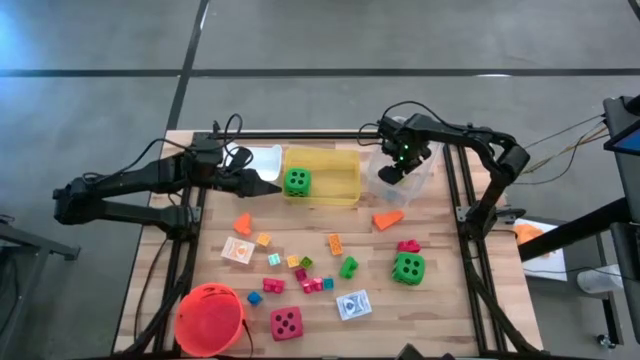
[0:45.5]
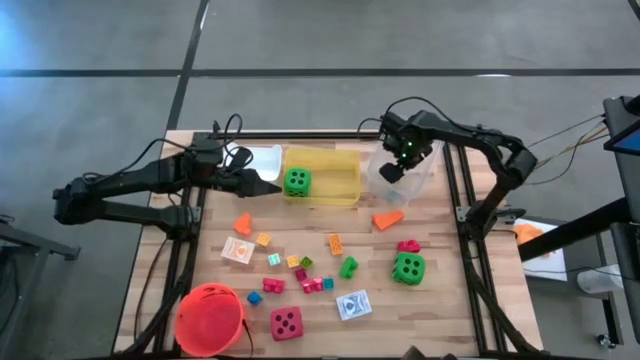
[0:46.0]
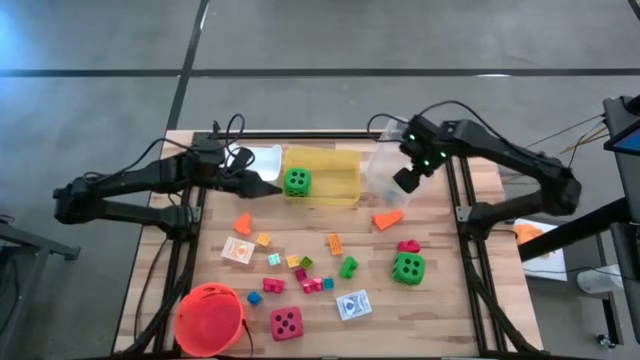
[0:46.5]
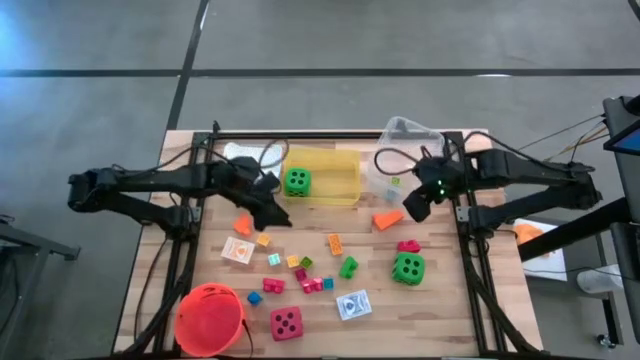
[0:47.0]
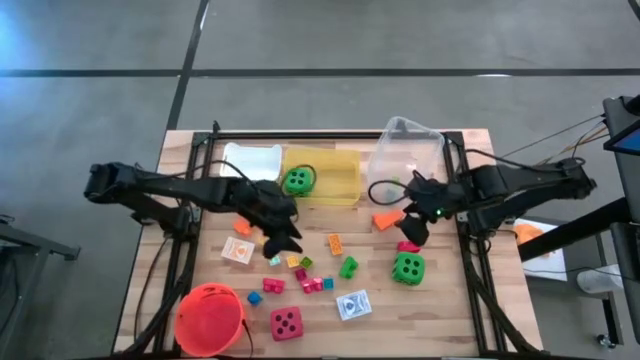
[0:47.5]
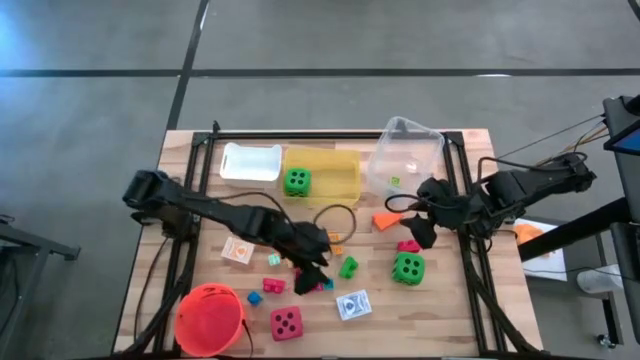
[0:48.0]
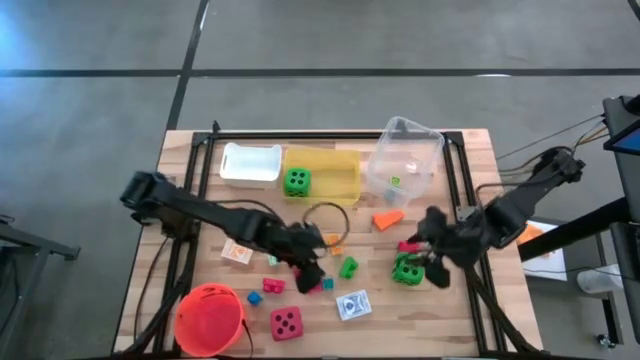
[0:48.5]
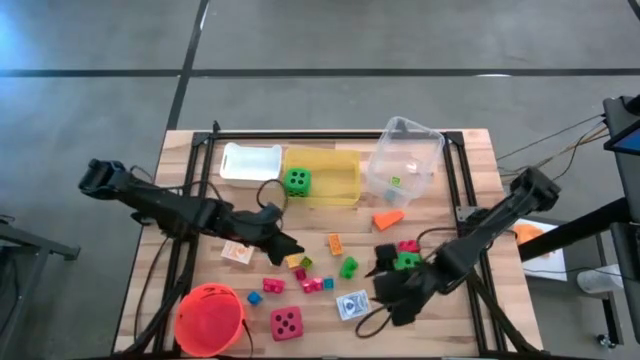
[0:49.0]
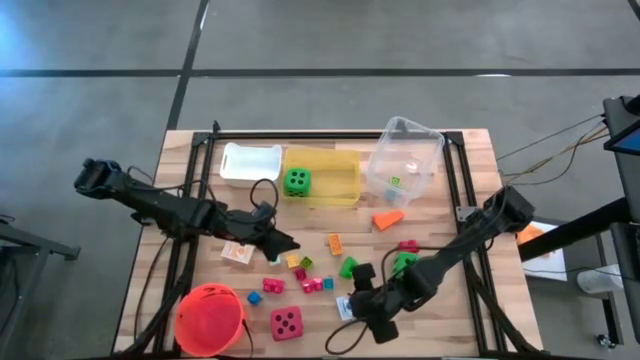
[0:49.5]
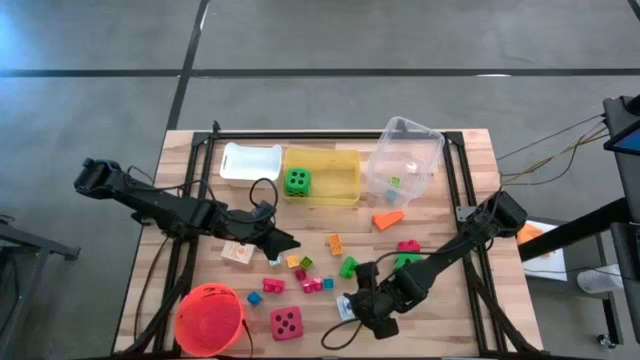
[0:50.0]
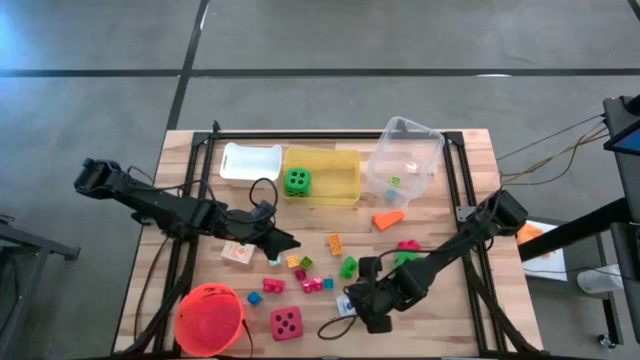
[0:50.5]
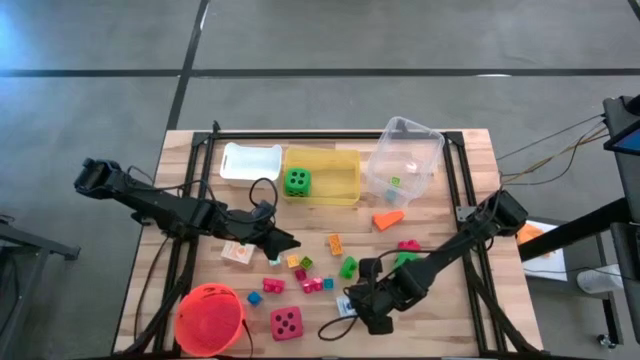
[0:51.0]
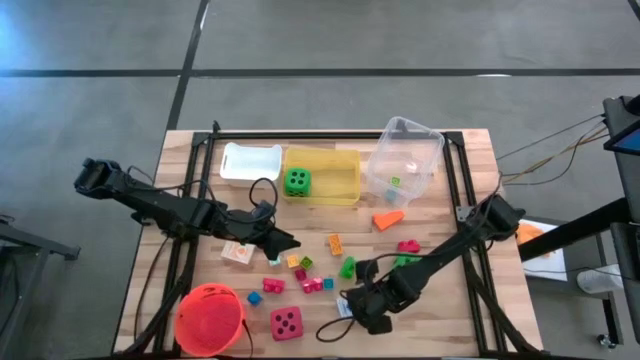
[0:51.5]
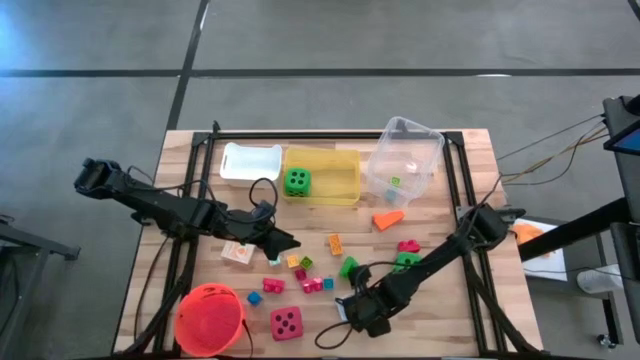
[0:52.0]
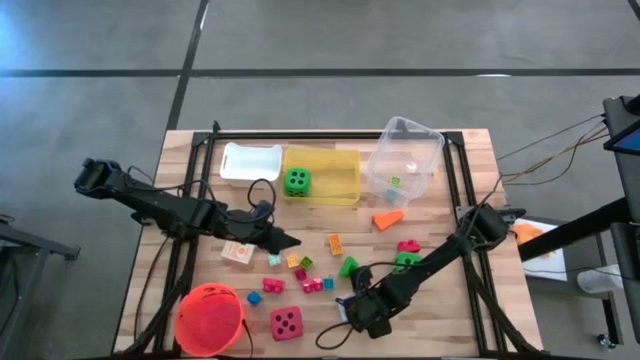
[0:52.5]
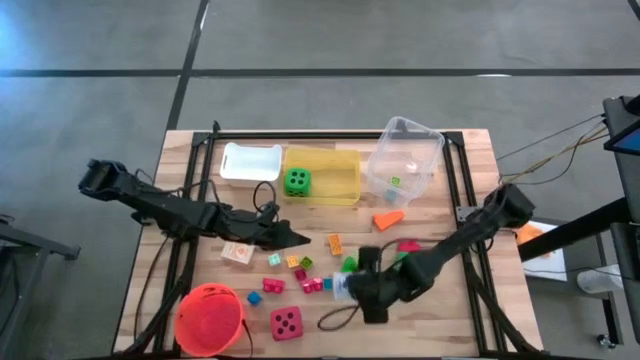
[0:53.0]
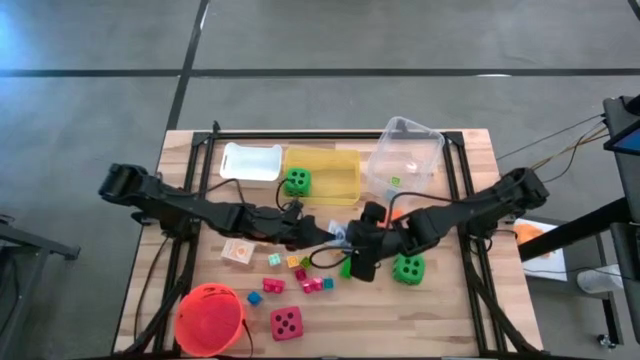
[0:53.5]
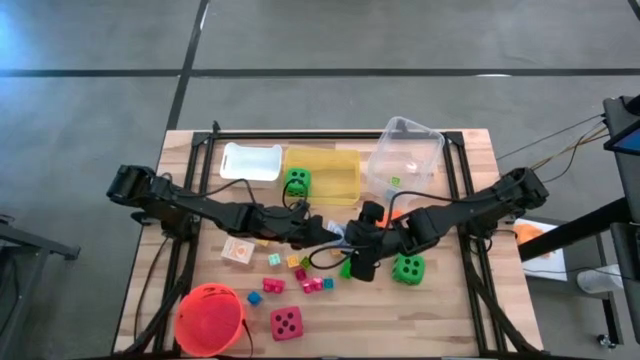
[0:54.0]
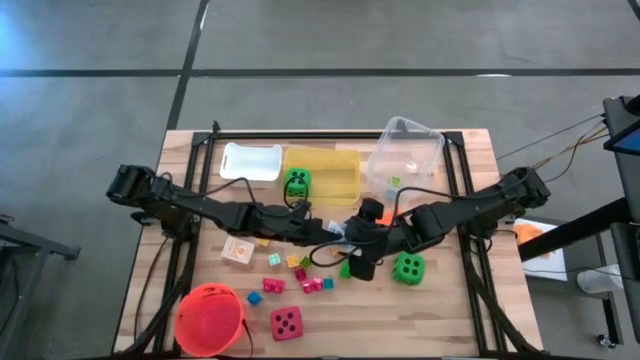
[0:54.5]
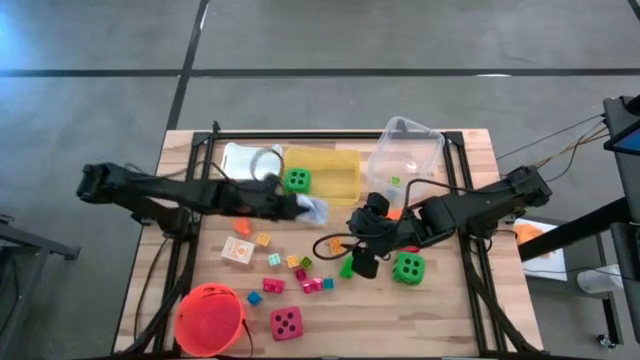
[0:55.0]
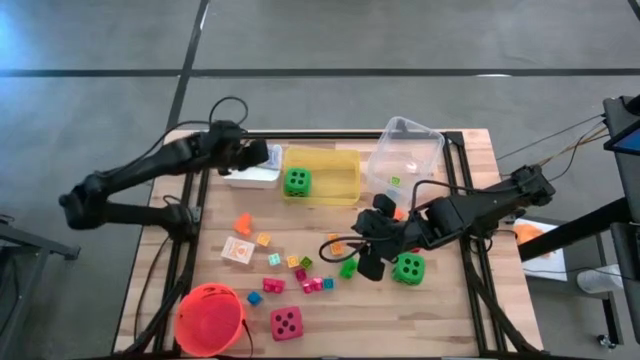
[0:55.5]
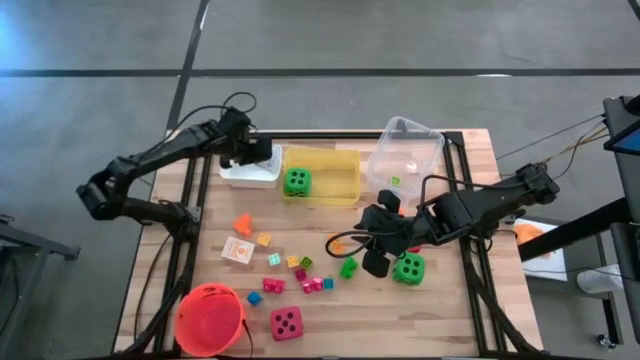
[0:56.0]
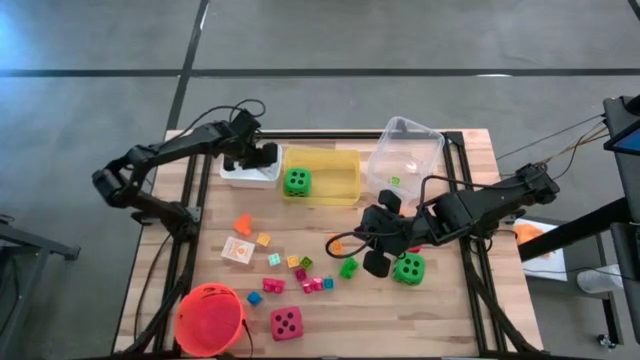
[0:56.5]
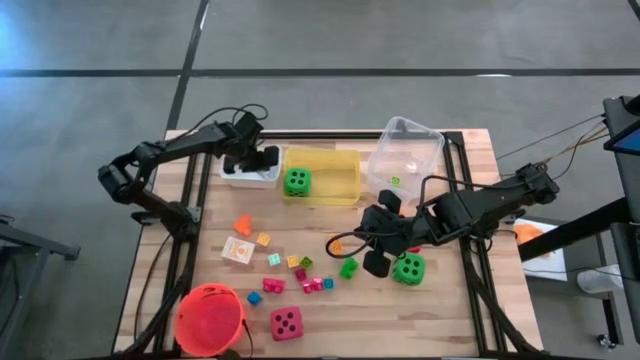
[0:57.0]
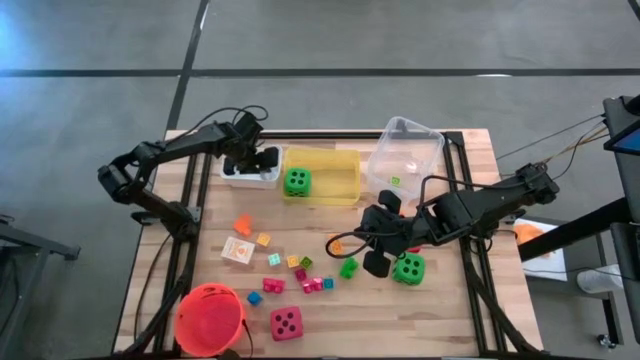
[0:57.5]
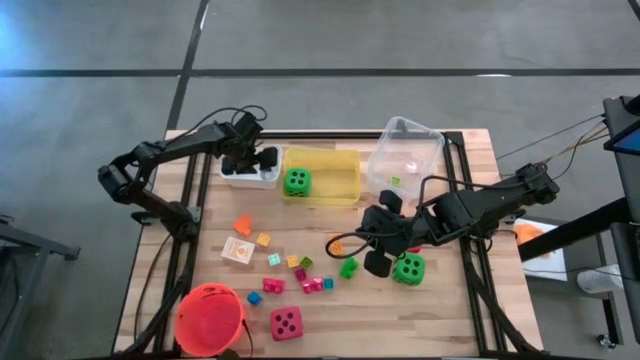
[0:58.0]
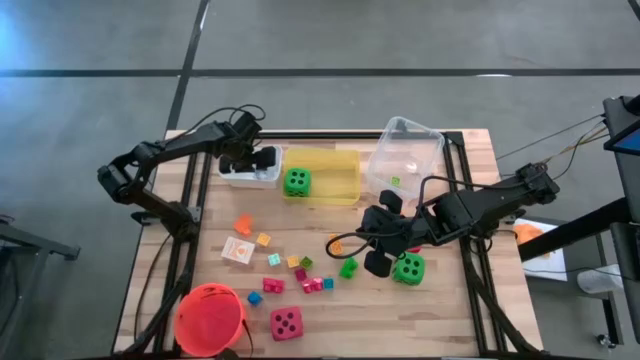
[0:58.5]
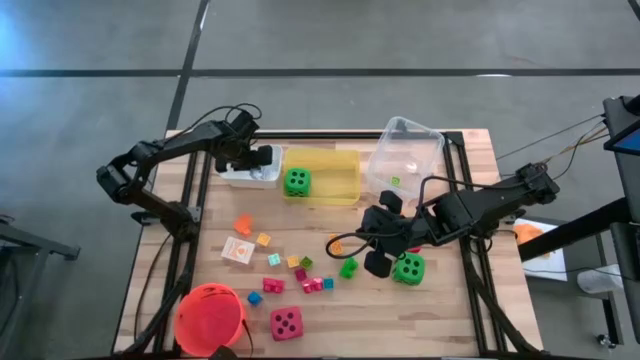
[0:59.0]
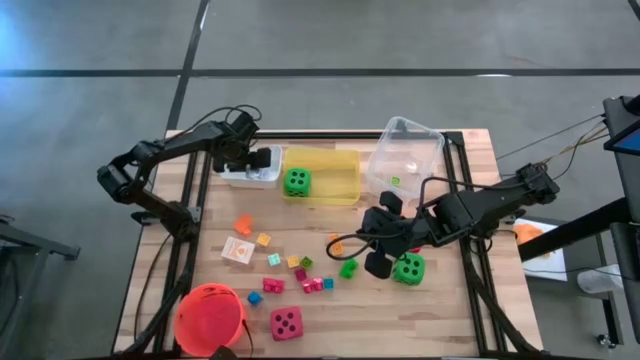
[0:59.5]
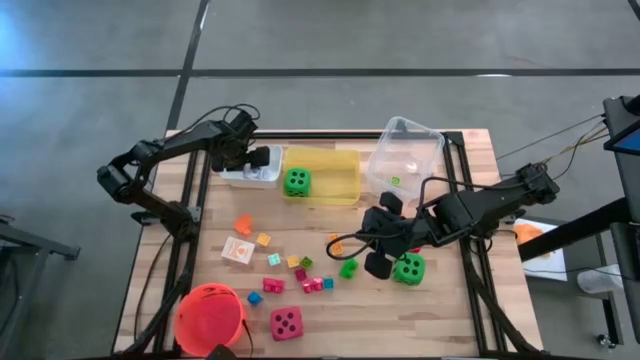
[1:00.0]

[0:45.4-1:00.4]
Task: Pick & Place Toys
Put the blue deck of cards into the white bin

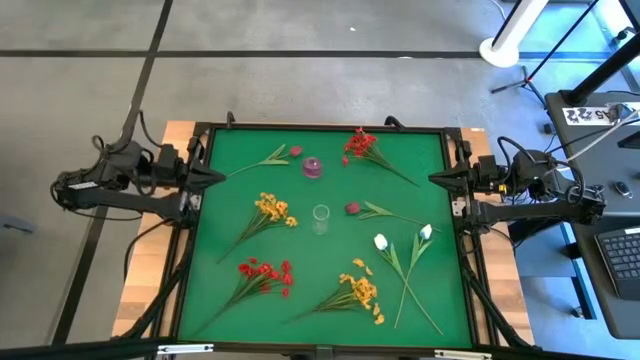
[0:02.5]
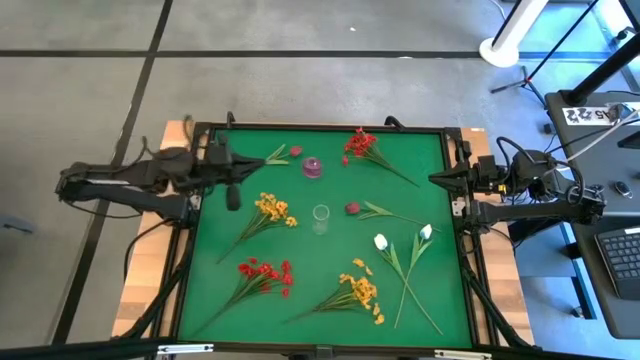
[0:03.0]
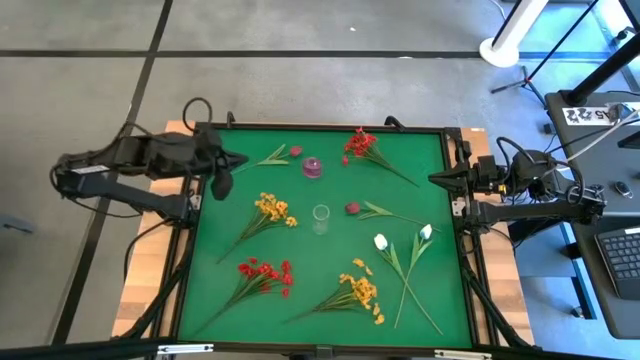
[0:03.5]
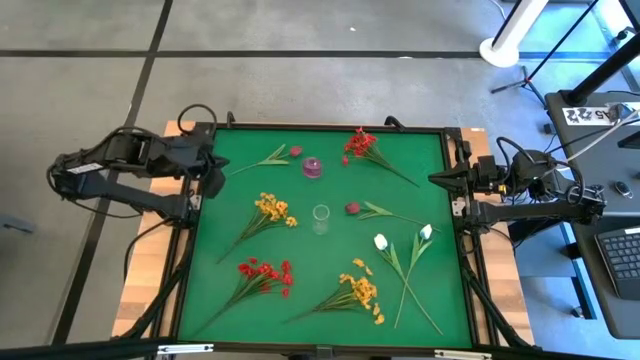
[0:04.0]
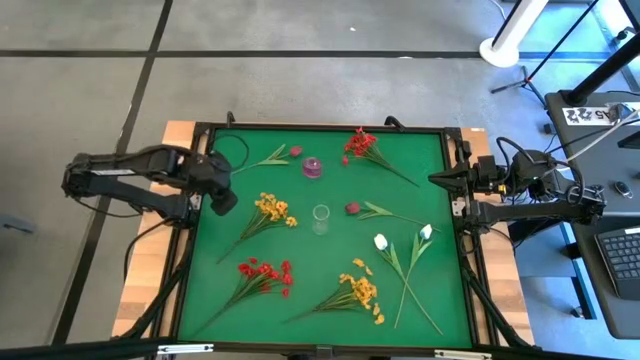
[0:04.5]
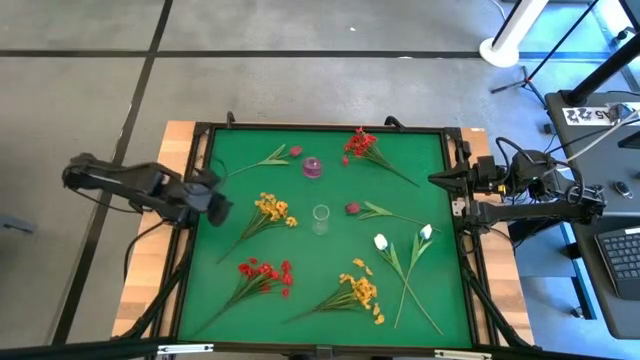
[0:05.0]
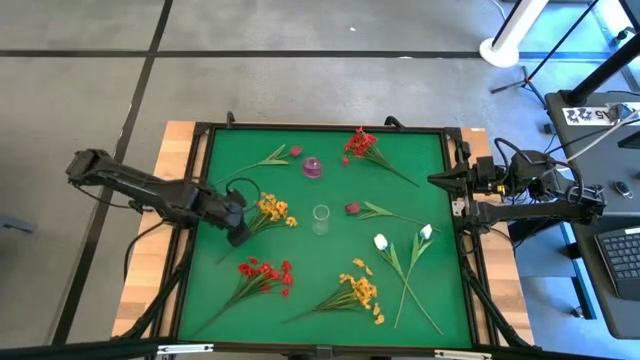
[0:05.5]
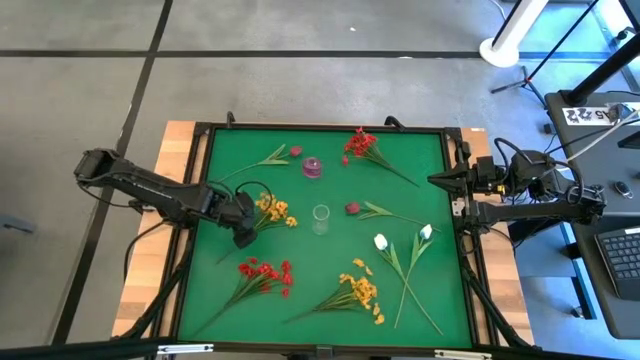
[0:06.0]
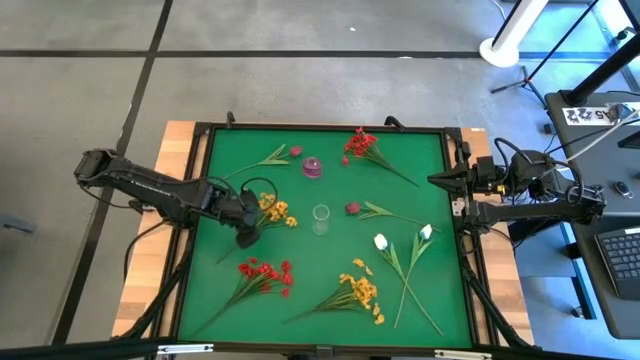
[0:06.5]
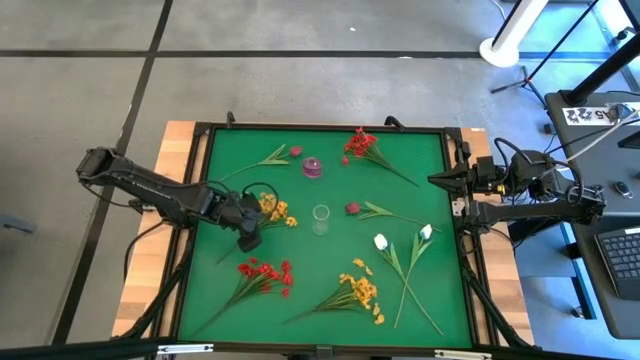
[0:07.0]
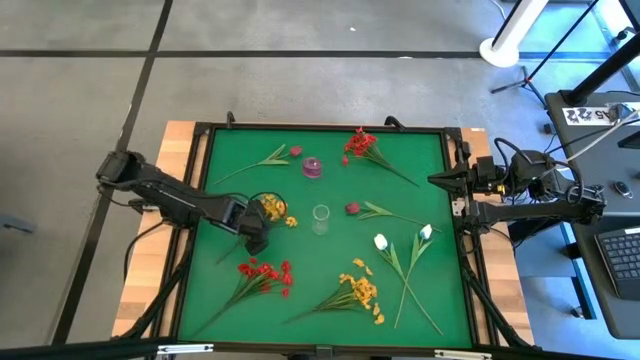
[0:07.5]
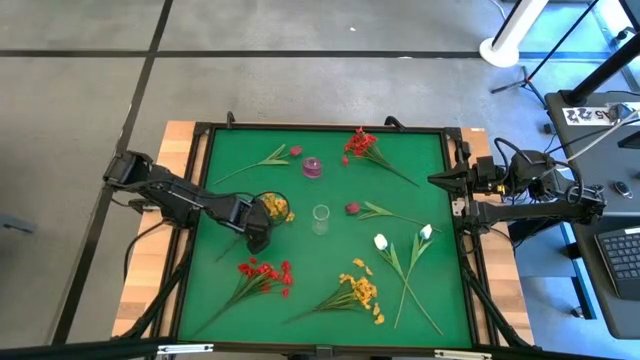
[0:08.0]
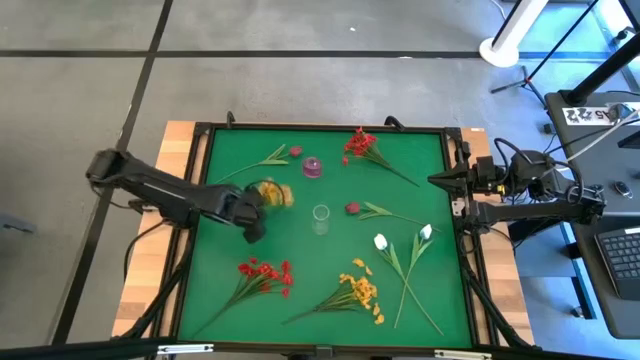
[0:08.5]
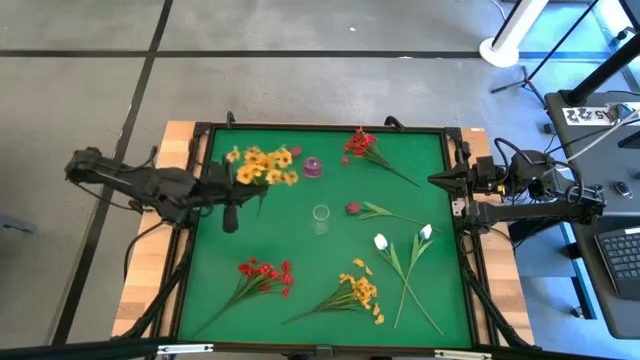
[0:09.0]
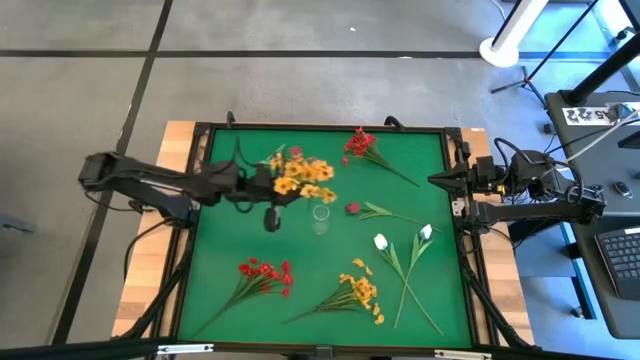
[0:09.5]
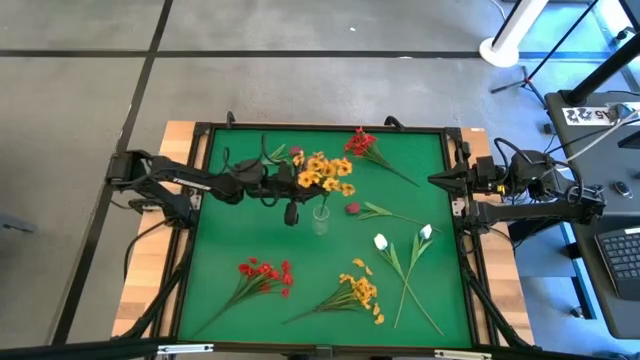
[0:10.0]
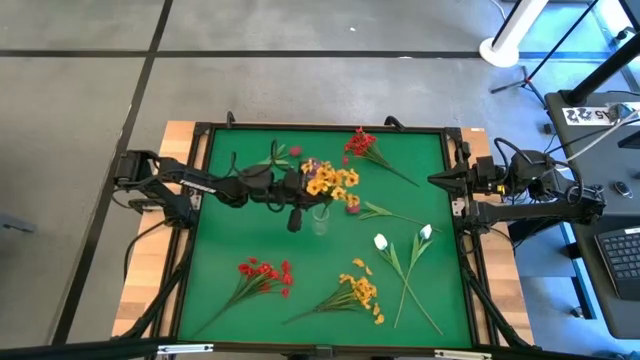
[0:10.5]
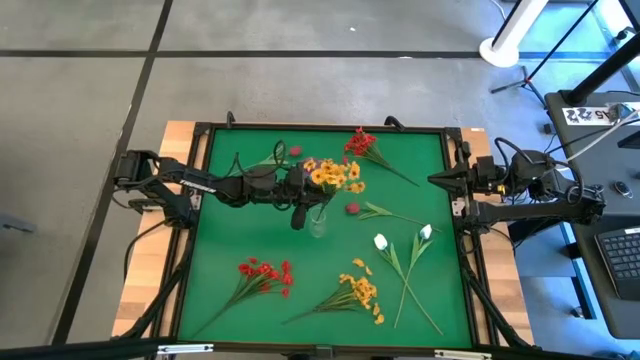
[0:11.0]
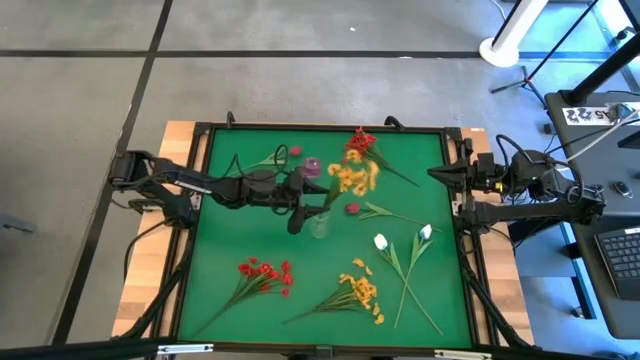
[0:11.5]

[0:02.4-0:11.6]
Task: Sort flowers into vase by color
Put the top yellow flowers into the transparent vase
